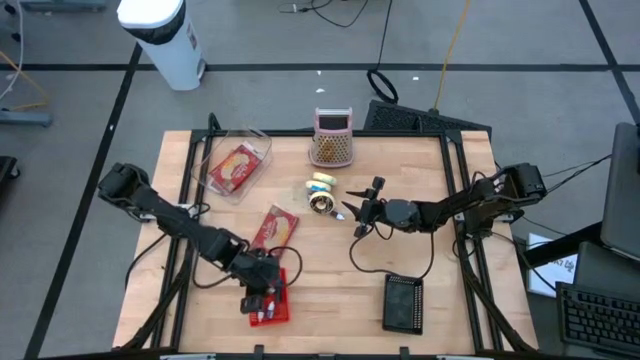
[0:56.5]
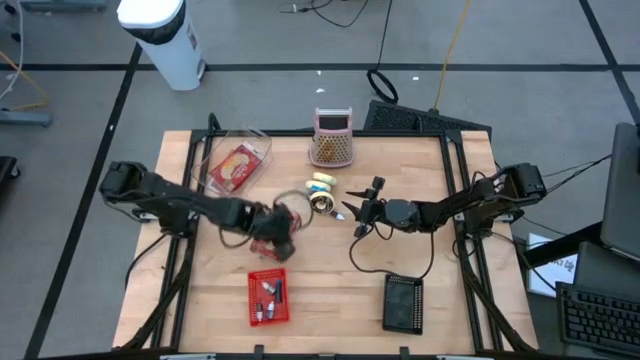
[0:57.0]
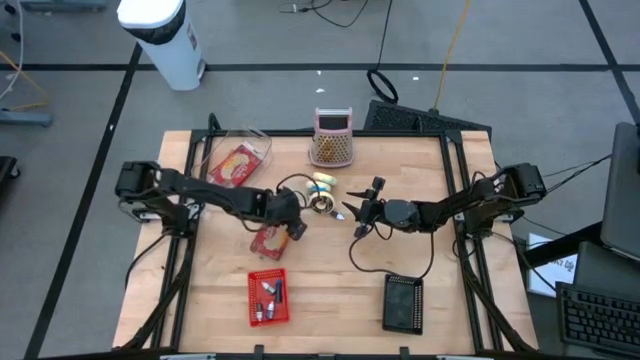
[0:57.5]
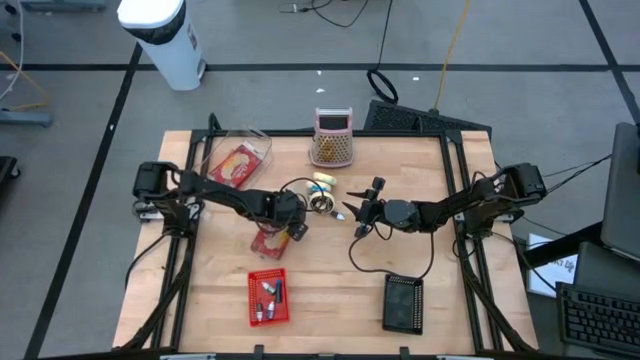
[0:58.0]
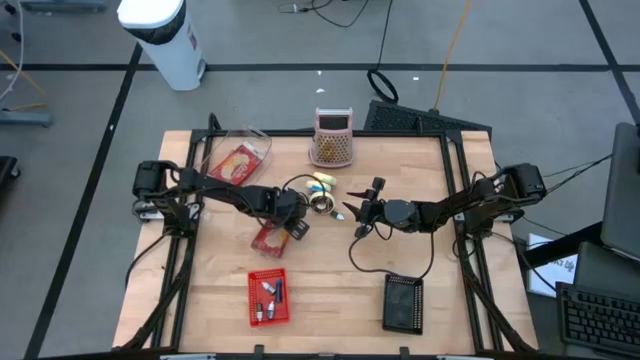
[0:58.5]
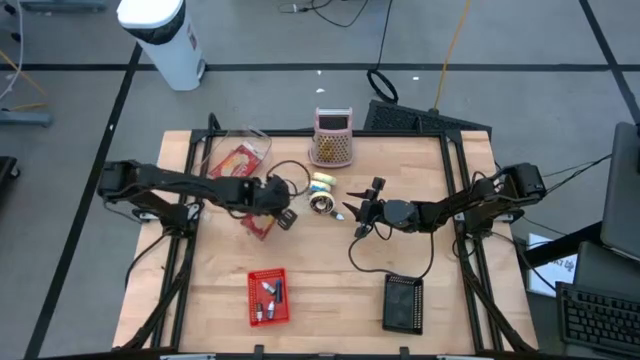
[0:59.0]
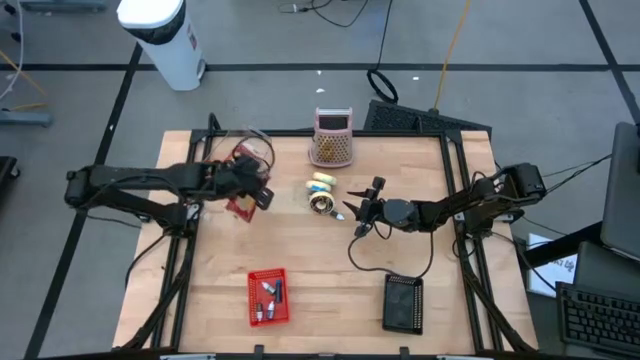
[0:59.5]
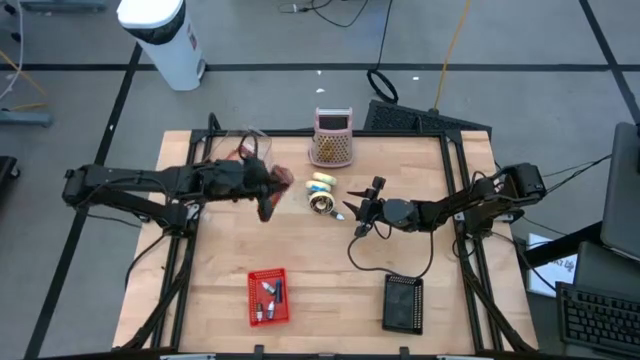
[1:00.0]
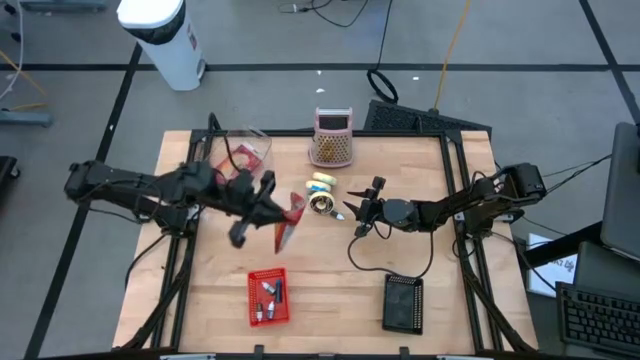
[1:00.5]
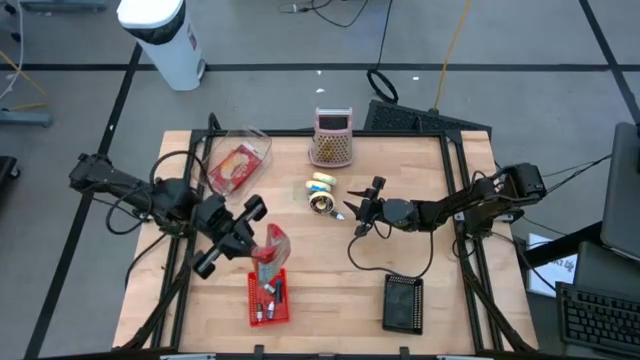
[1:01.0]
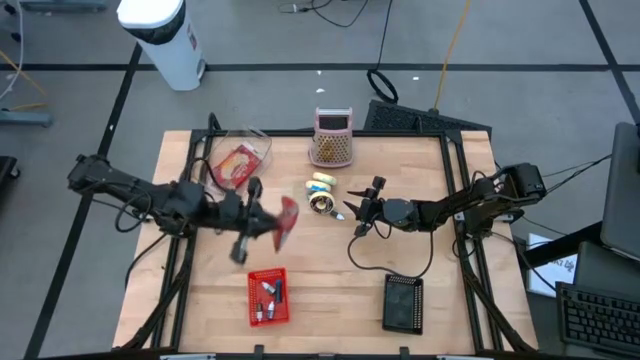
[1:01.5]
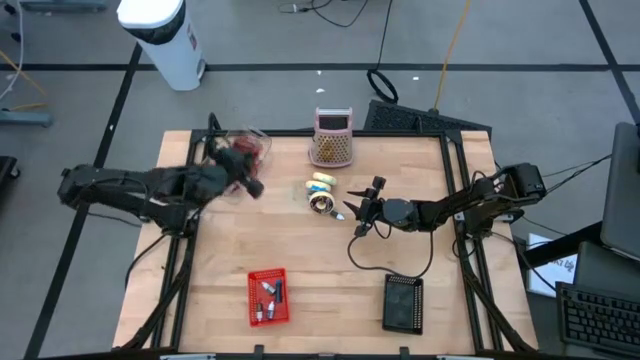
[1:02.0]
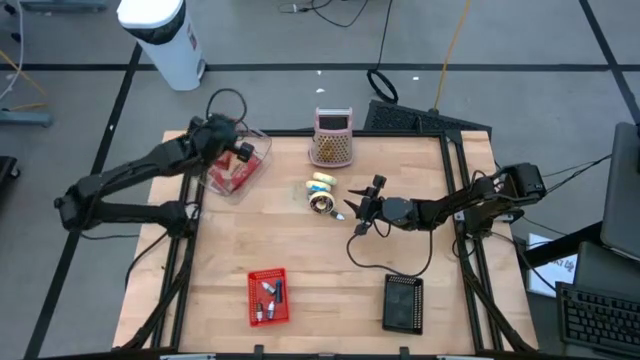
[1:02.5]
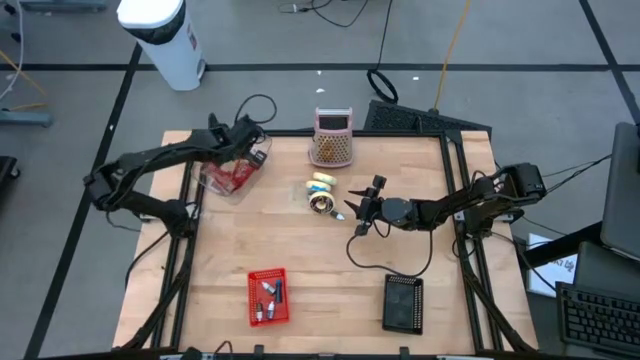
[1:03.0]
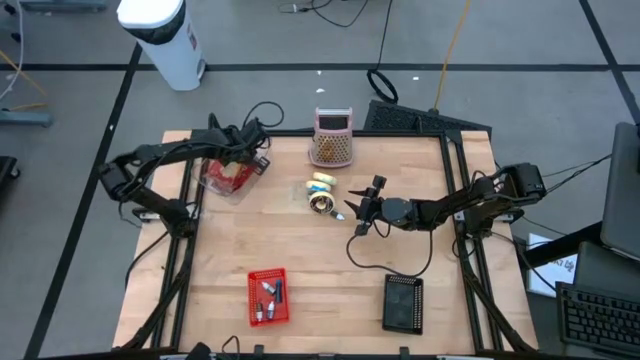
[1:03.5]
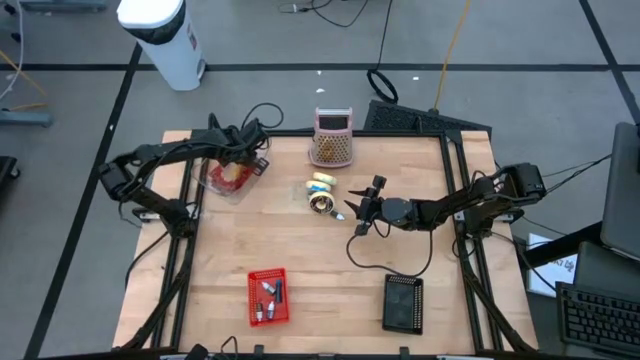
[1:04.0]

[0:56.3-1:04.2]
Put the red popcorn bag into the transparent bin

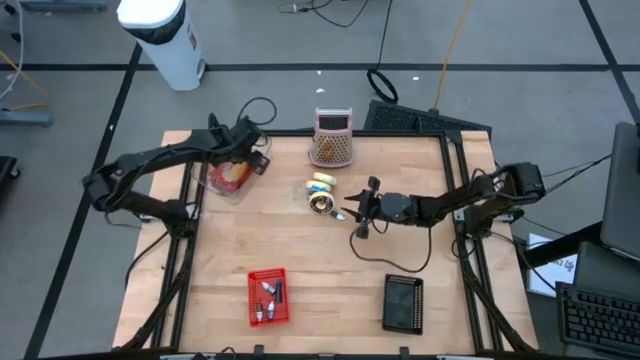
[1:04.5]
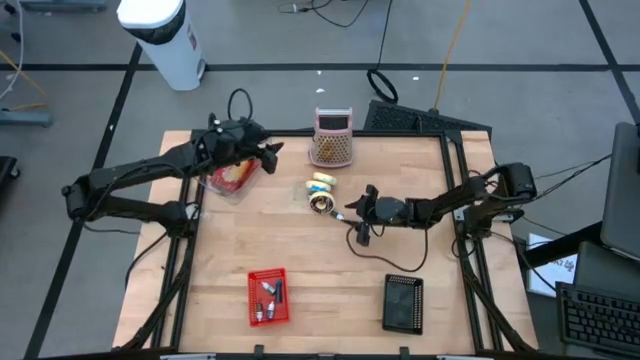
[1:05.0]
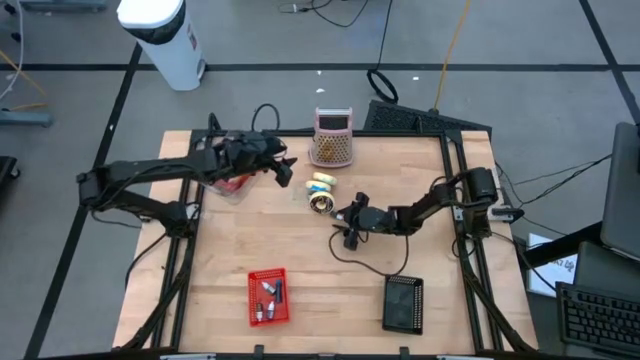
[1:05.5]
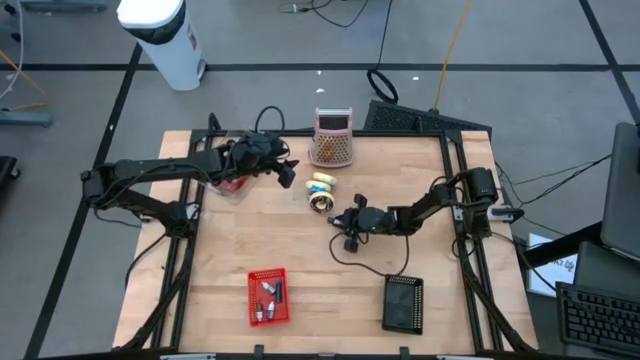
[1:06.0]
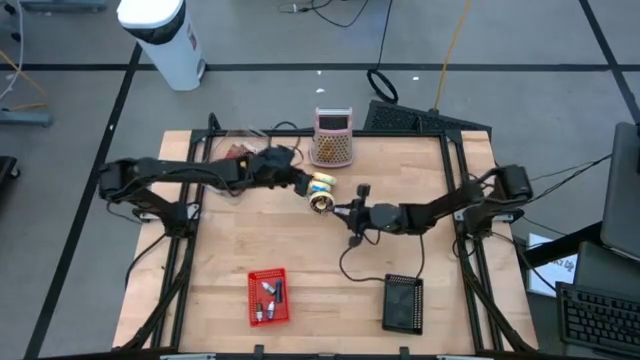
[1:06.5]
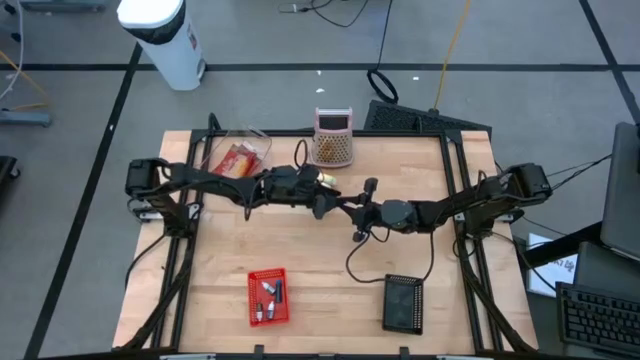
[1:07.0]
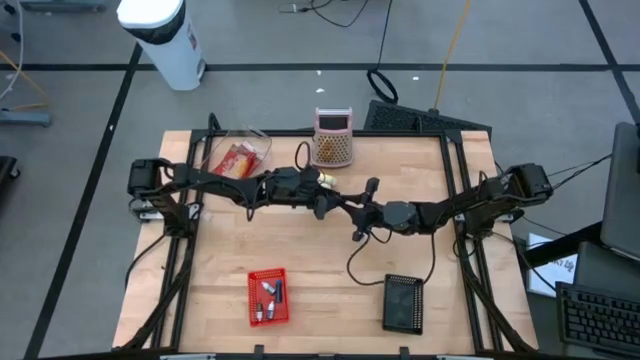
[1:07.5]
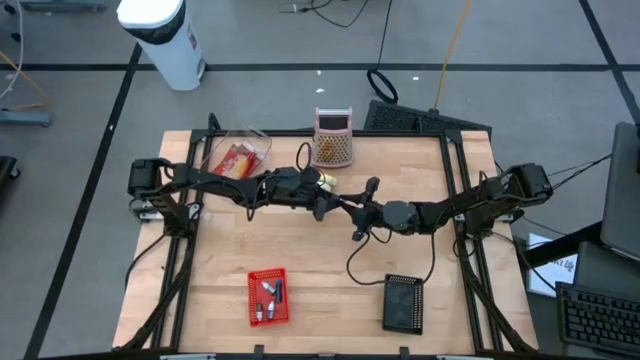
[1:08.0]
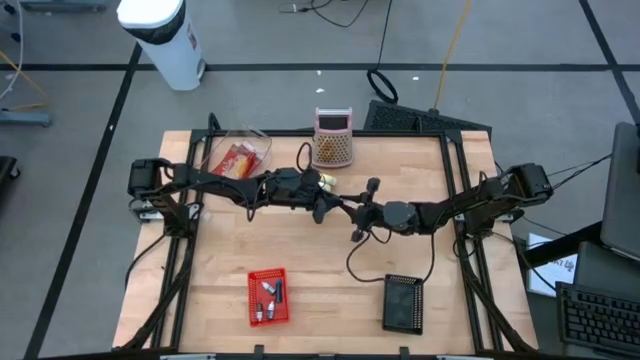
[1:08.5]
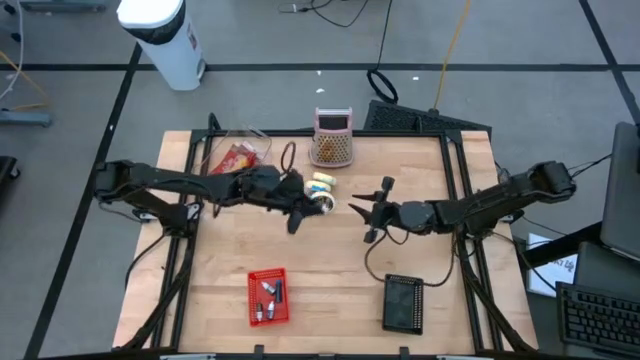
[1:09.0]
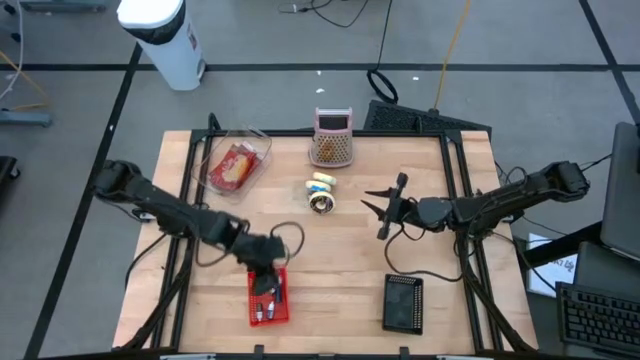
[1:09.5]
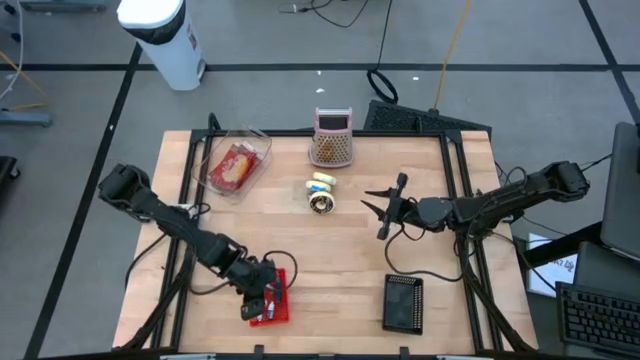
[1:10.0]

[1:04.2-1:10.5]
Put the black food coloring bottle into the red bin

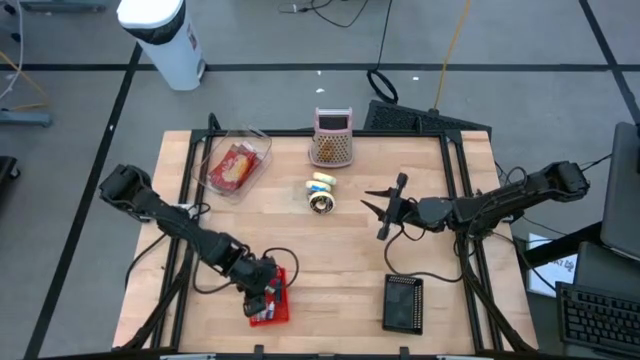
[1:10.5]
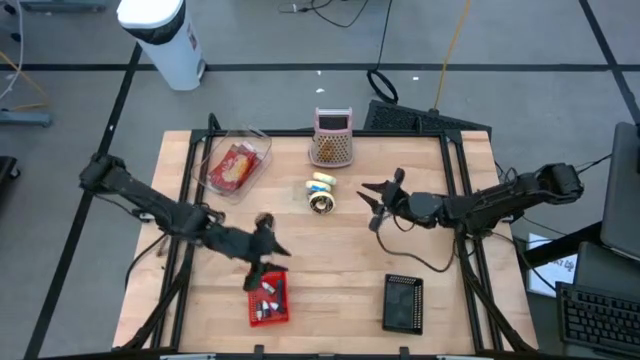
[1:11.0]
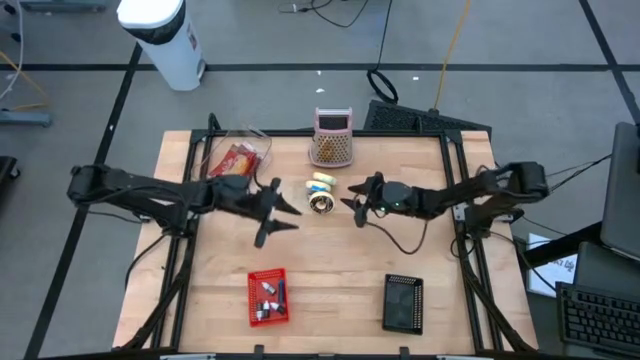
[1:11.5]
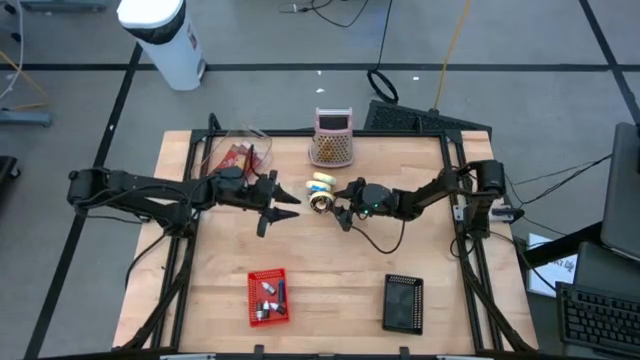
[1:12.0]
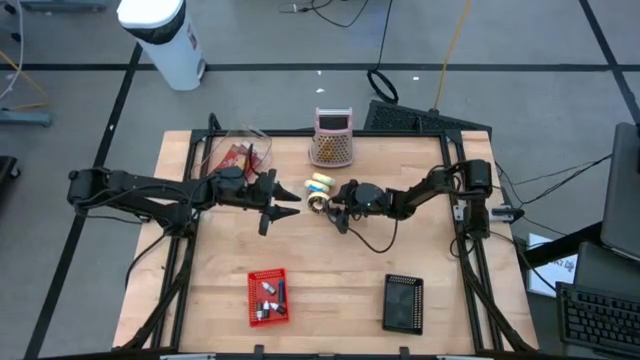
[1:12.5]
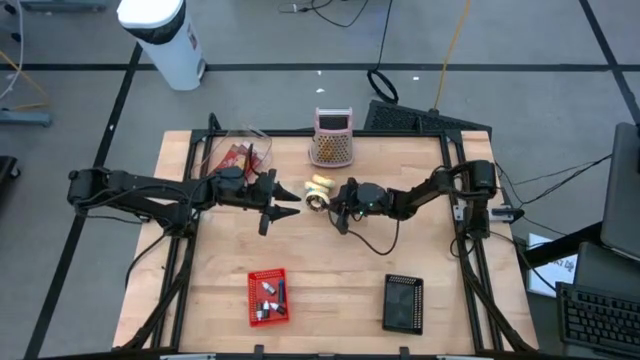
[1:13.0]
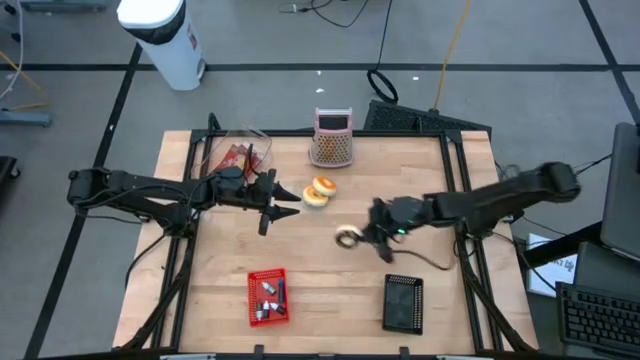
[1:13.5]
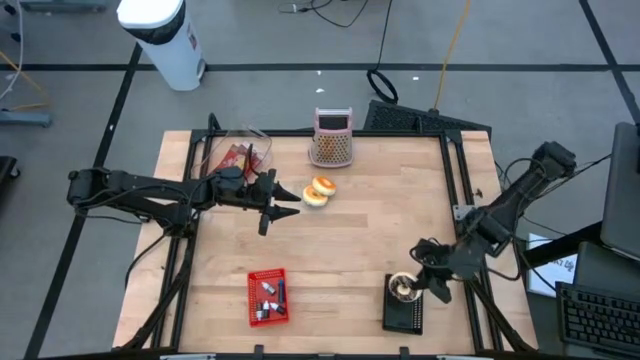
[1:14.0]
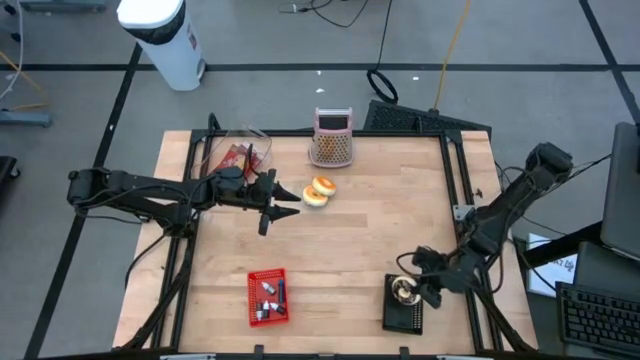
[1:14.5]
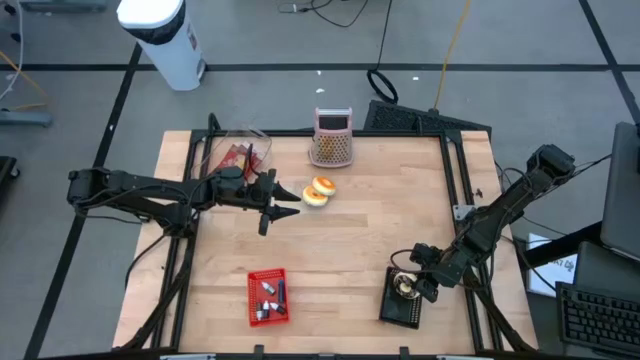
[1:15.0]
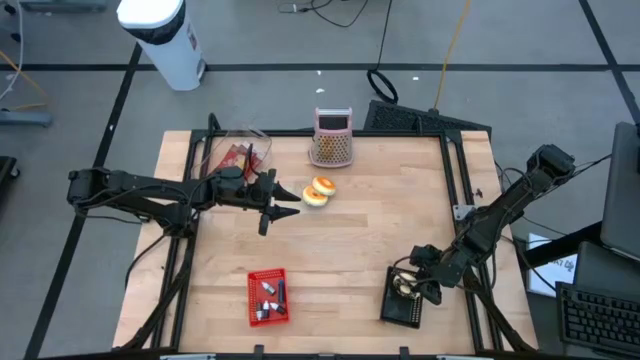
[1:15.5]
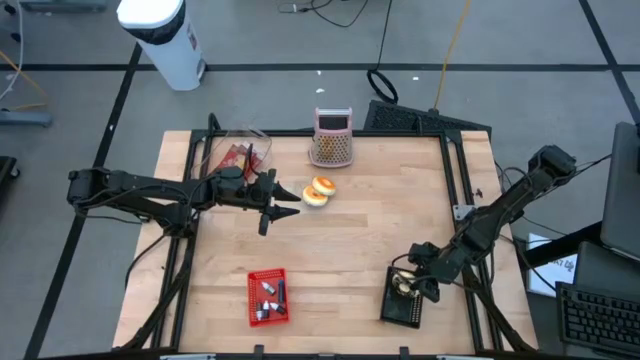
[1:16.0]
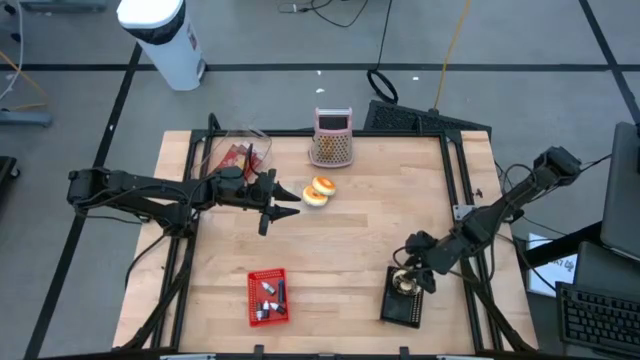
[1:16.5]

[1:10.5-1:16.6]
Put the black doughnut into the black bin
